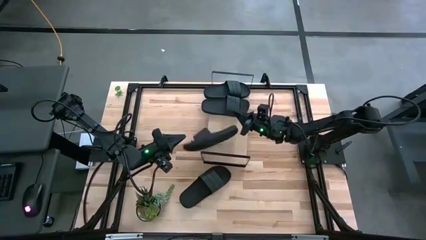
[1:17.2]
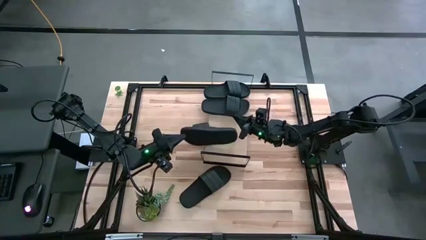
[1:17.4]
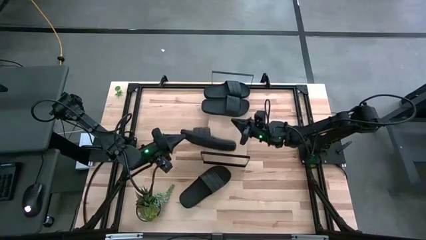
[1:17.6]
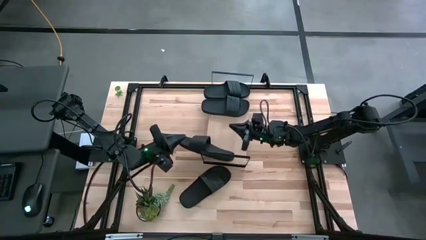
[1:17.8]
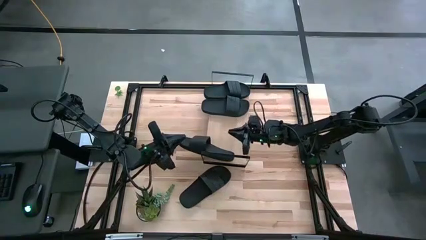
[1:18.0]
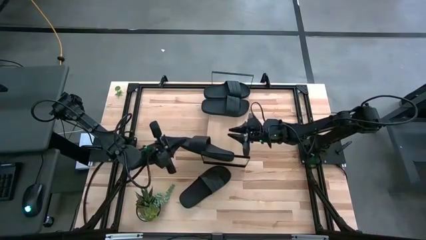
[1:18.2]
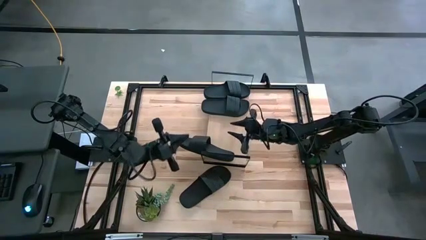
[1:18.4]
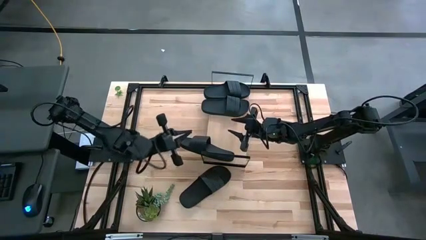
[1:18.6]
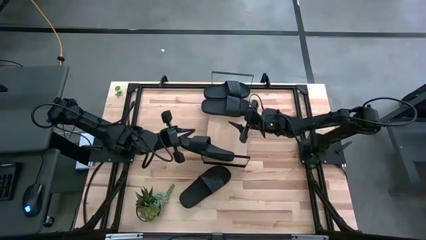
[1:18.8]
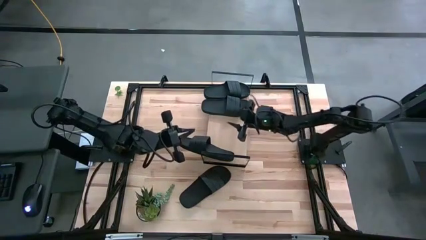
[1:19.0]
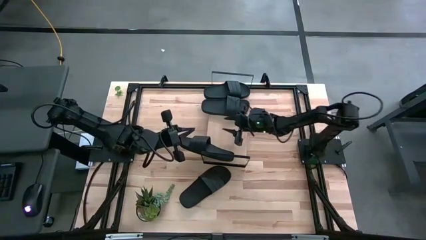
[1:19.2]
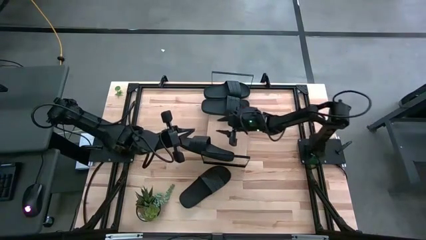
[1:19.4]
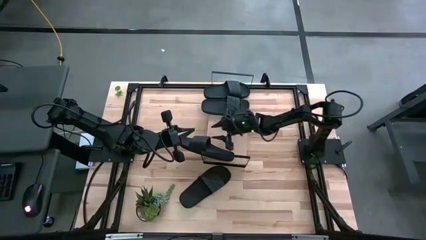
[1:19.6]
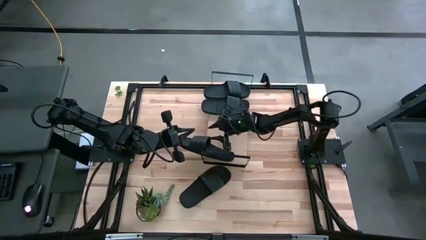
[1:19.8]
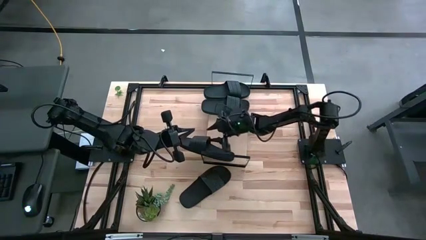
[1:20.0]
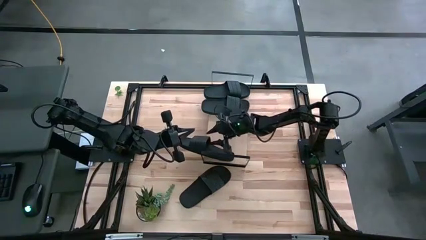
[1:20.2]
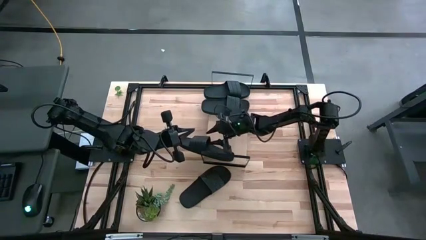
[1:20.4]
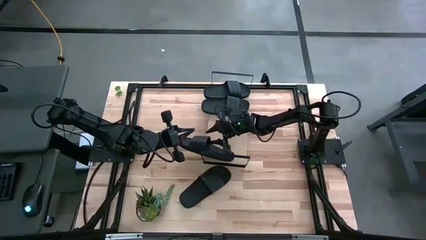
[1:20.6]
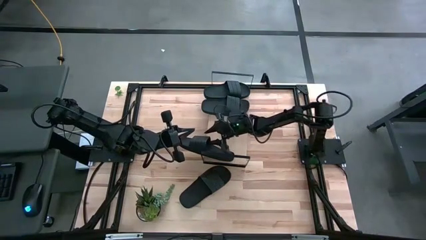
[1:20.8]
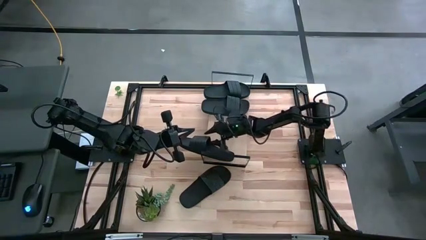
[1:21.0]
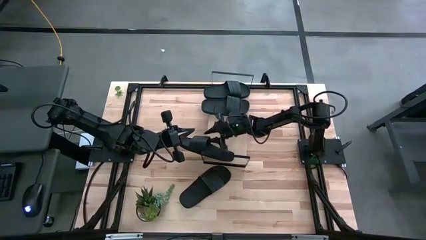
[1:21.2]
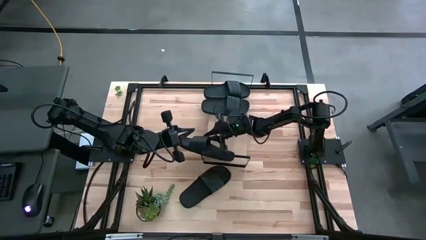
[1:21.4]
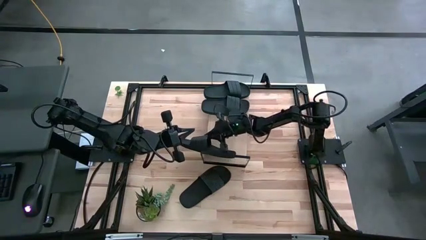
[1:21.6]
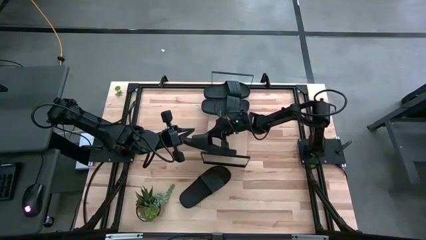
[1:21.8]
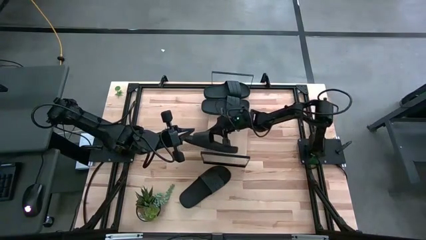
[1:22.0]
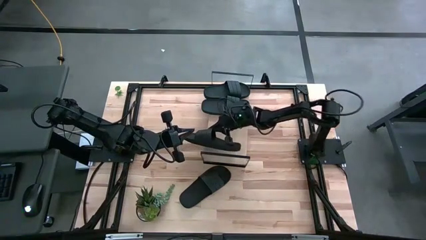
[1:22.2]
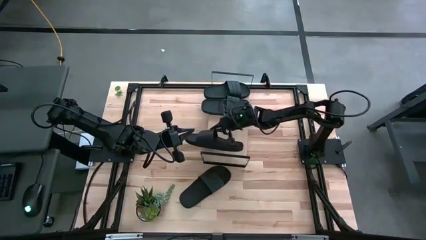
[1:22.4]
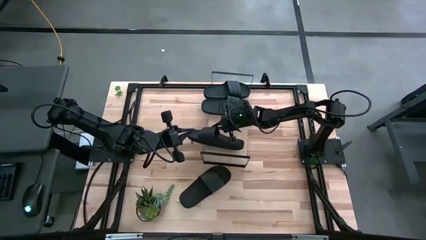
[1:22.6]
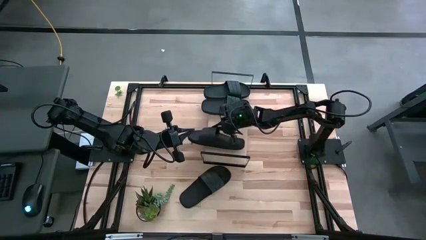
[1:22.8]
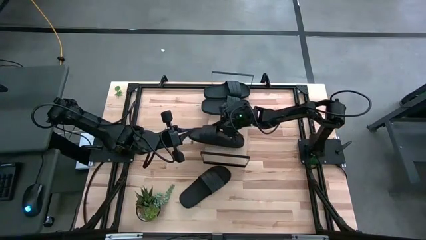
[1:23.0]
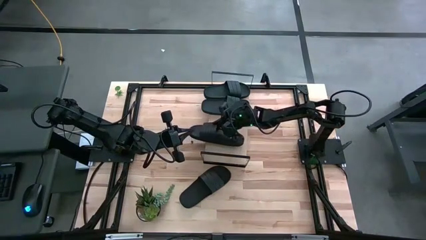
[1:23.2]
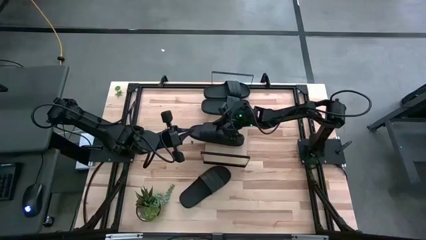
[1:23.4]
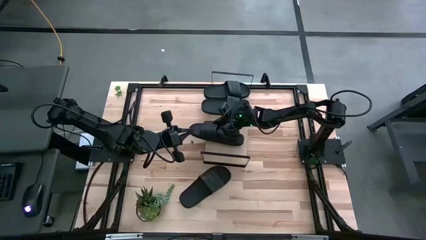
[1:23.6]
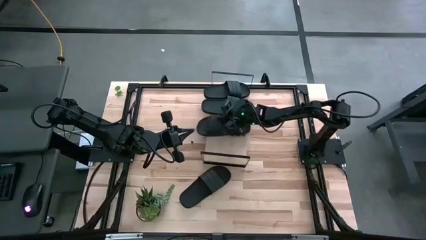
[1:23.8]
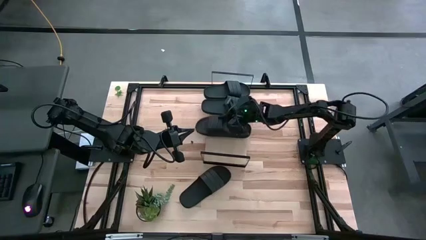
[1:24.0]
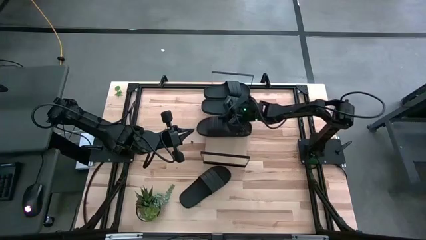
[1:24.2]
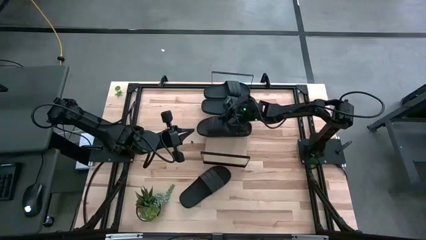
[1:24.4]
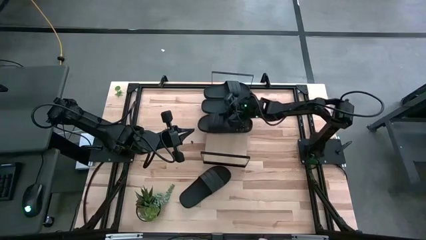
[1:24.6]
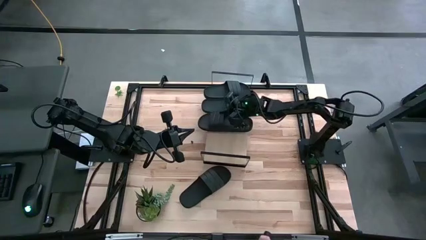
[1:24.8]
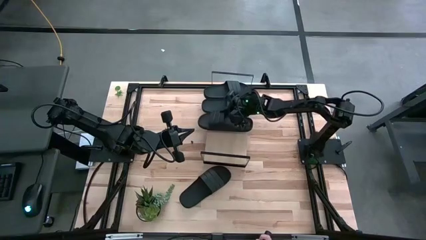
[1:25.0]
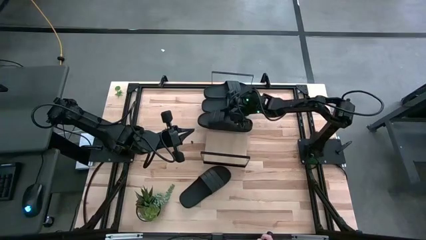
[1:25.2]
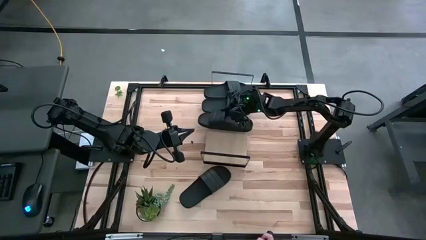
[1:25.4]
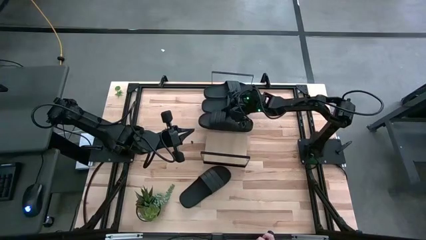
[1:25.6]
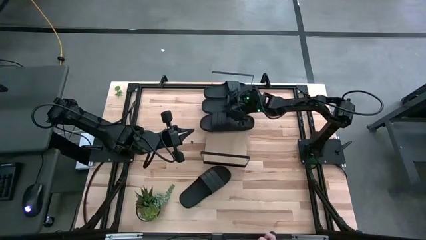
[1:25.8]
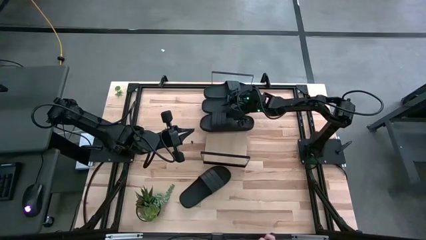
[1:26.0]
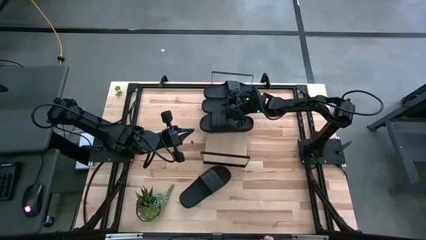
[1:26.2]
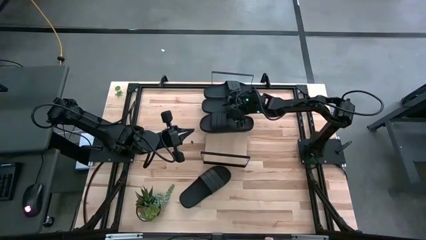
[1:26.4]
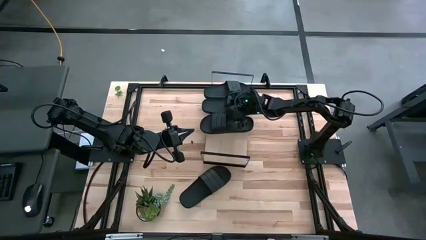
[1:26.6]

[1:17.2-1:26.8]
Task: Pick and place slides into the shelf
Put the top black slide on the shelf

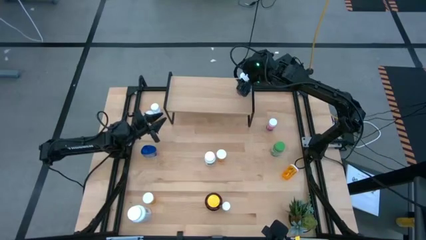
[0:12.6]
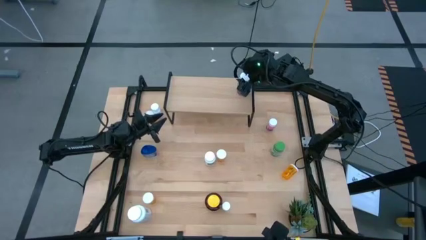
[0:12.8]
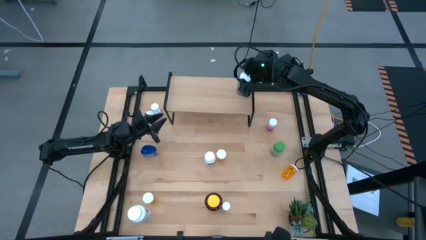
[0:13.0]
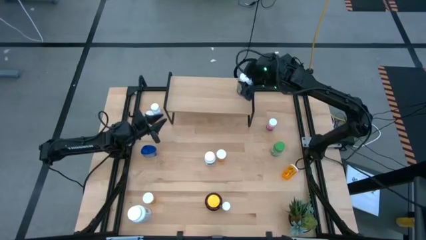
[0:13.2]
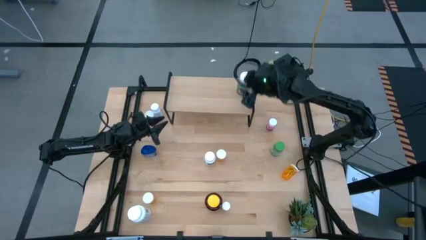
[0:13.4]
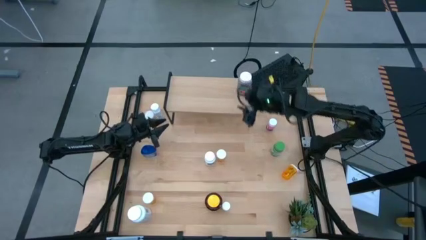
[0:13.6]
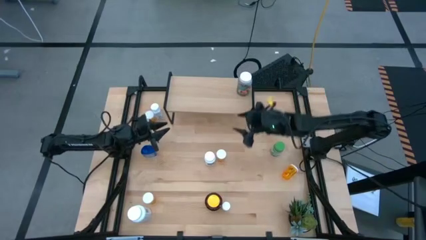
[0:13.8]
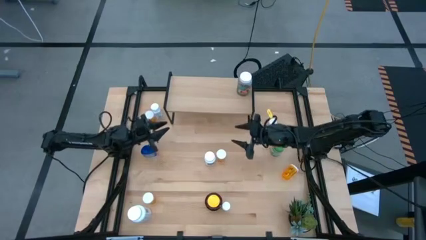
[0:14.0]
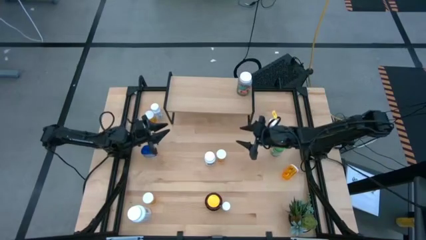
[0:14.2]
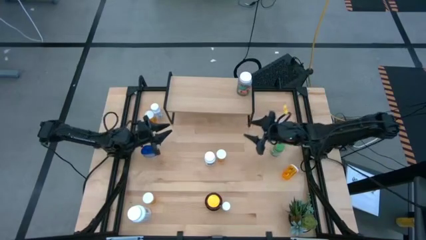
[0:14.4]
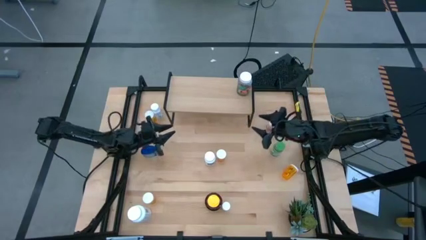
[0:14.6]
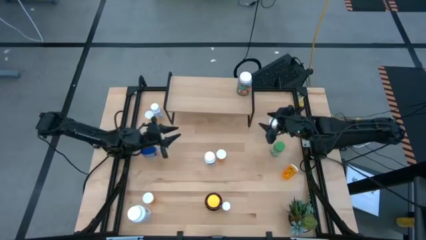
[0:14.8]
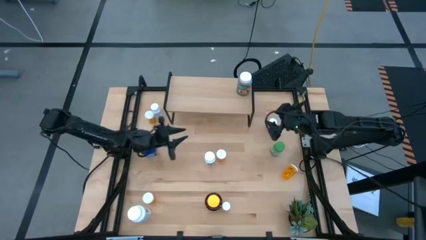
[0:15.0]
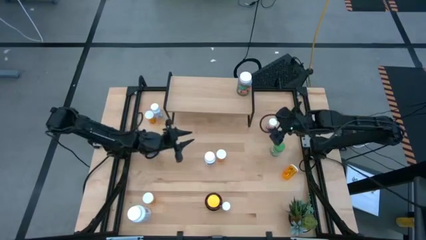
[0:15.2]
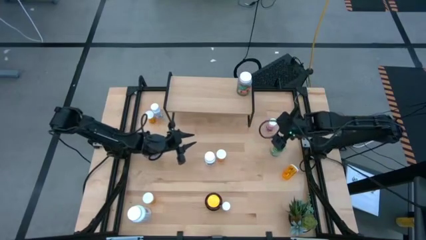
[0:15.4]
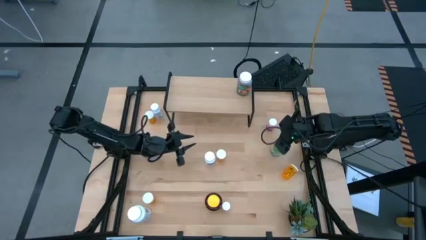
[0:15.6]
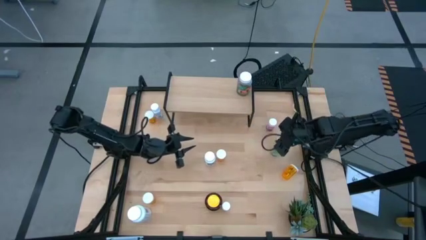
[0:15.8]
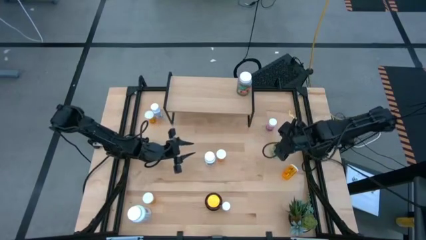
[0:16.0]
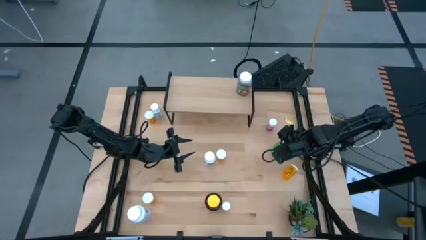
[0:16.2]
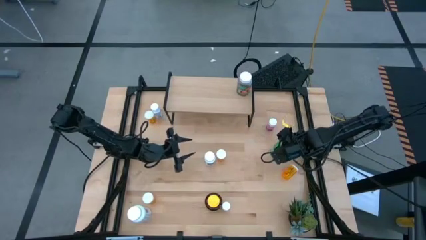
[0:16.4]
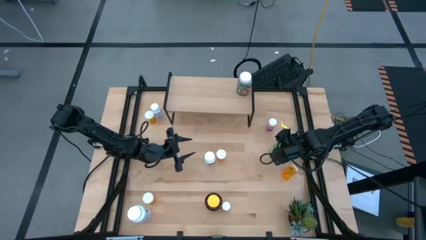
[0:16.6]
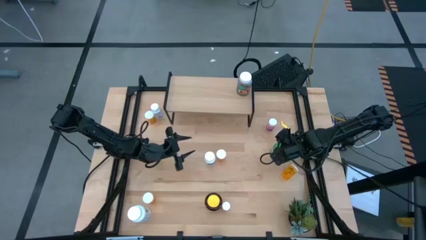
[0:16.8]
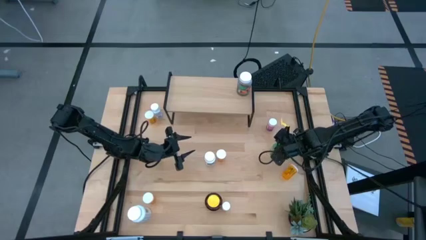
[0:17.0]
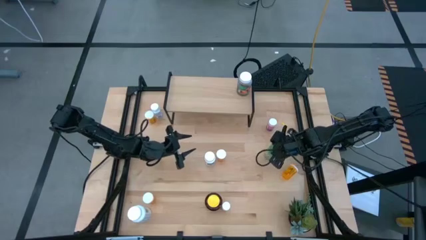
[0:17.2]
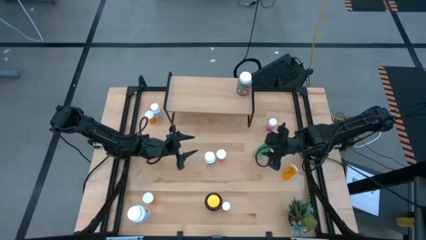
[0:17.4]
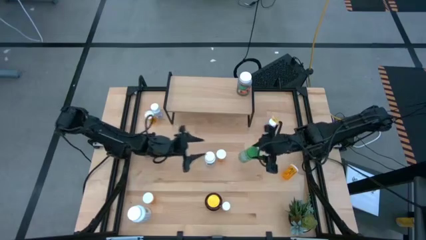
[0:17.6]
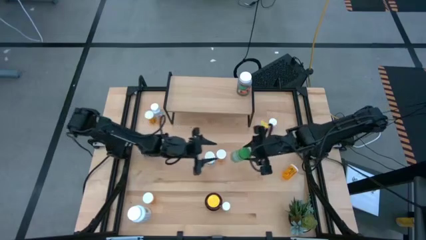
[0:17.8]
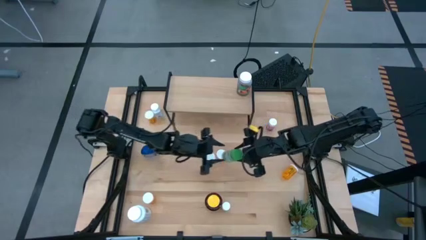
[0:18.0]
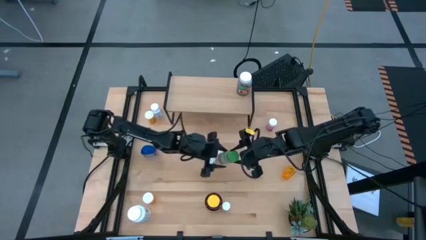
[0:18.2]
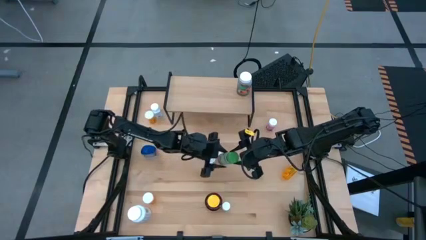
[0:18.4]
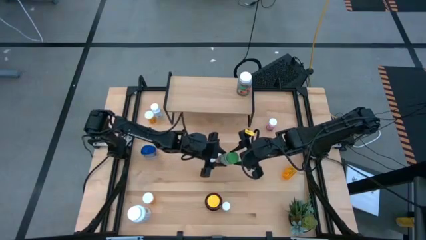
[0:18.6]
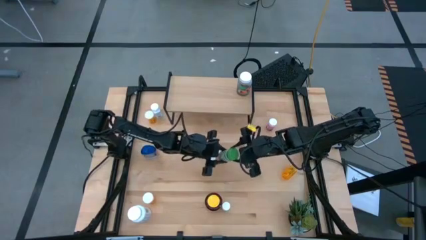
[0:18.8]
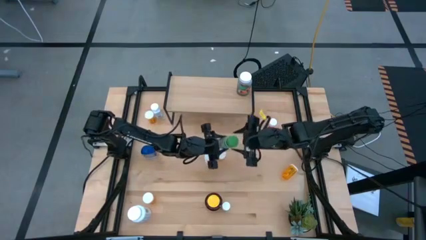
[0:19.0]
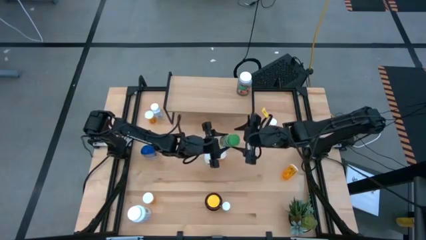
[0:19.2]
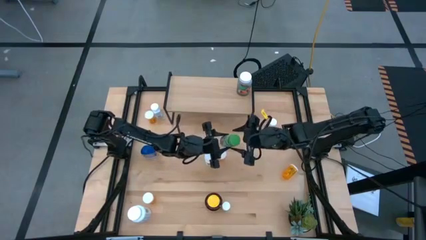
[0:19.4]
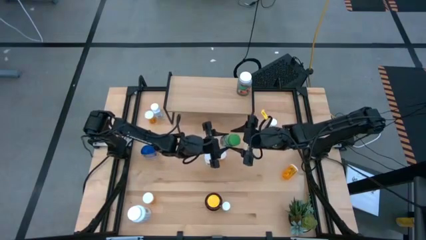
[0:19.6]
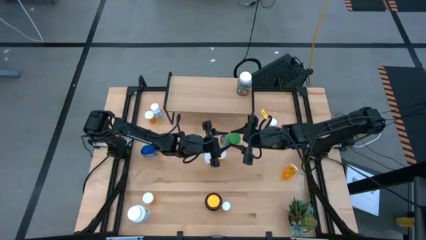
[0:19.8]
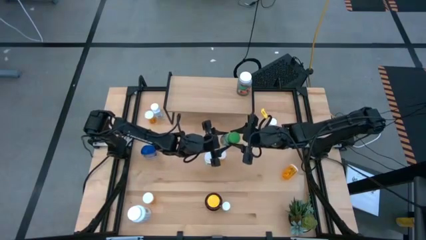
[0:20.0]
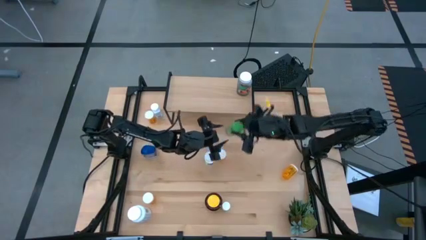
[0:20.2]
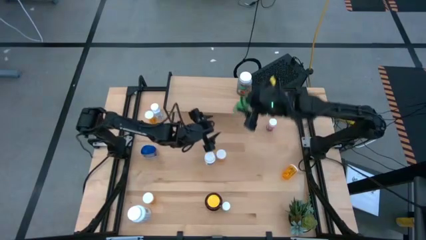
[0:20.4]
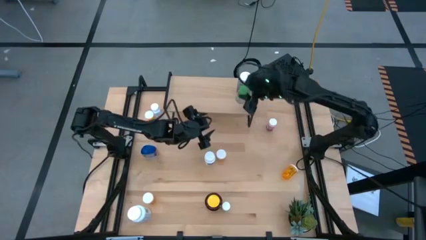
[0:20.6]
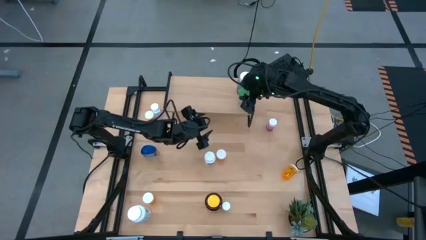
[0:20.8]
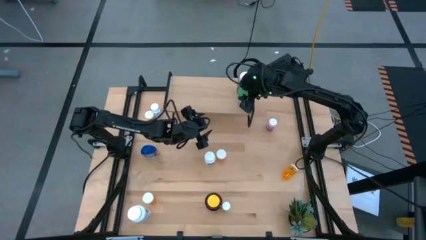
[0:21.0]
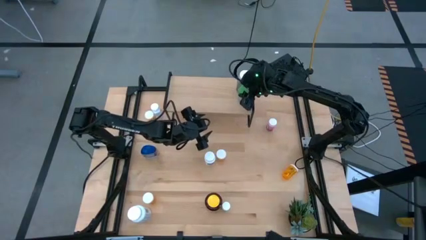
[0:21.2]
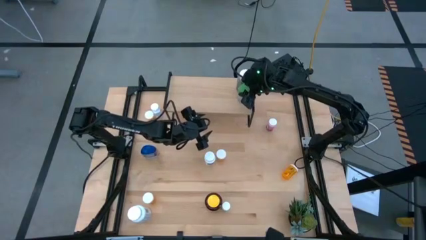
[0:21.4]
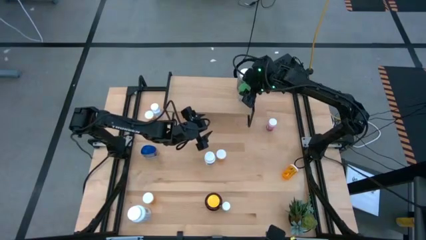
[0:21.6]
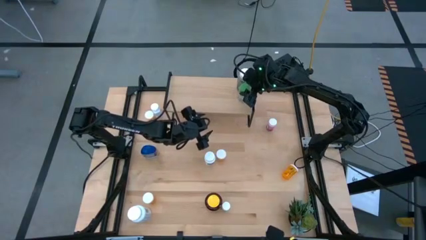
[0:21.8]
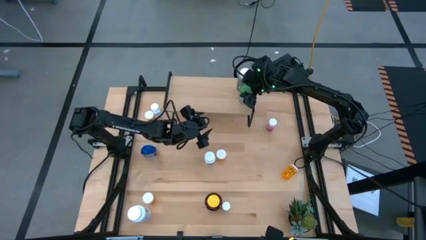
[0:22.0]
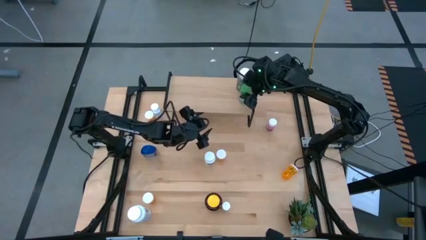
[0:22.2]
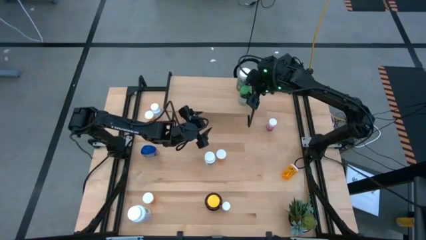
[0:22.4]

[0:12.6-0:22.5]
Task: Pick and place medicine bottles onto shelf by color
Put the light green pill bottle on the shelf
